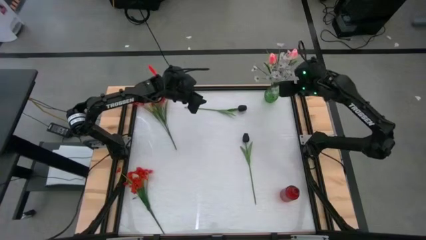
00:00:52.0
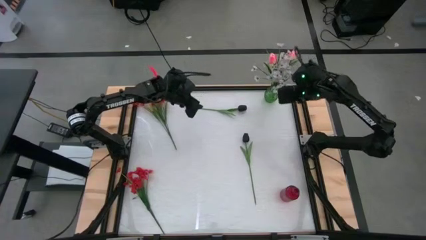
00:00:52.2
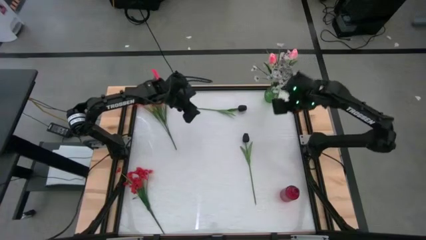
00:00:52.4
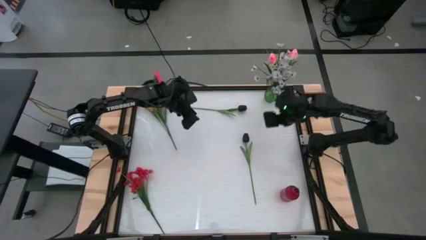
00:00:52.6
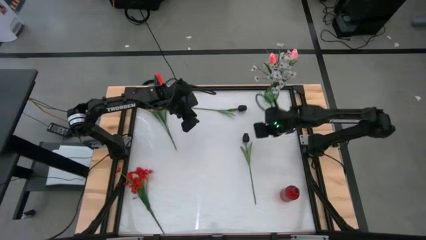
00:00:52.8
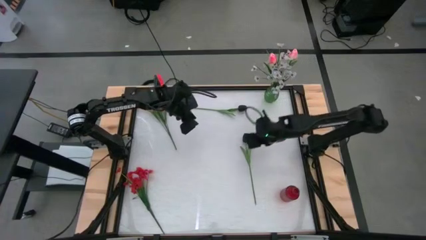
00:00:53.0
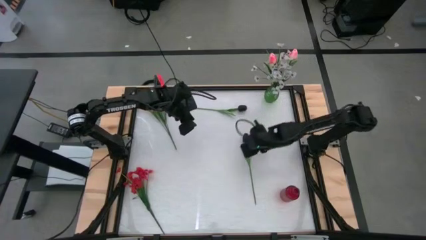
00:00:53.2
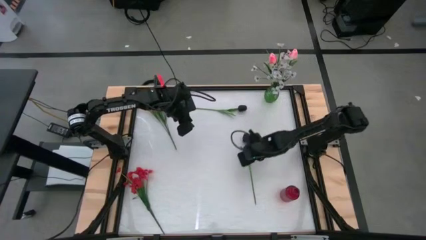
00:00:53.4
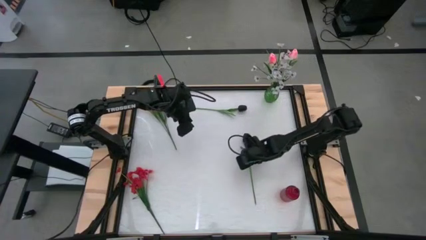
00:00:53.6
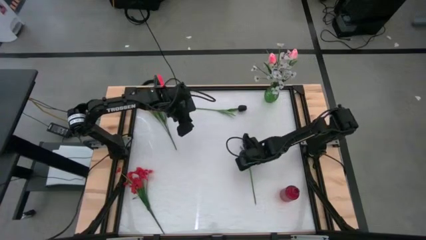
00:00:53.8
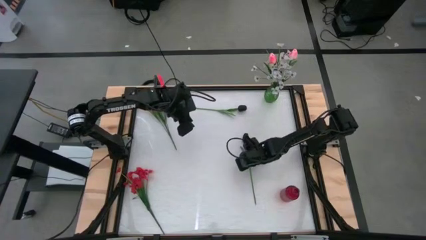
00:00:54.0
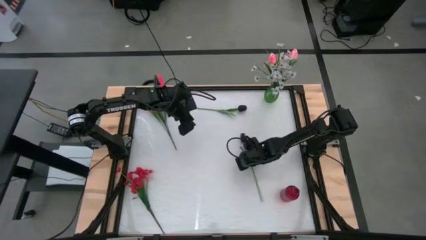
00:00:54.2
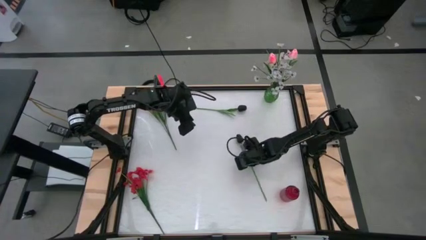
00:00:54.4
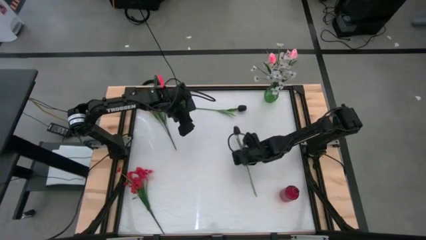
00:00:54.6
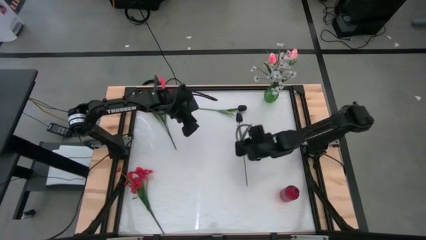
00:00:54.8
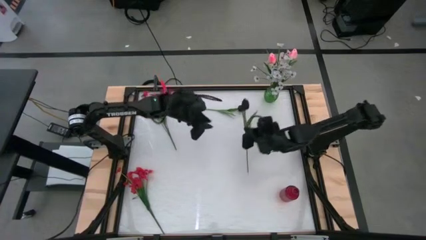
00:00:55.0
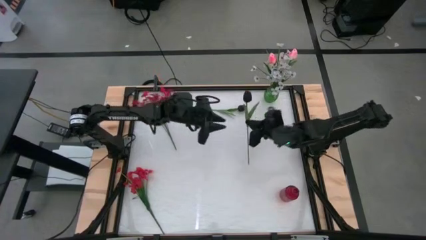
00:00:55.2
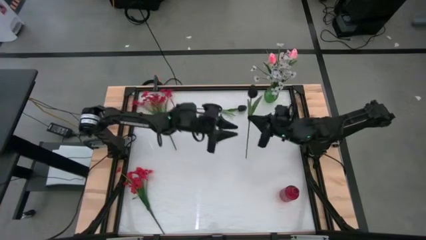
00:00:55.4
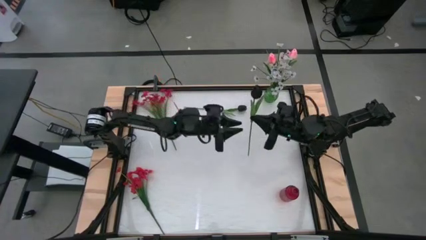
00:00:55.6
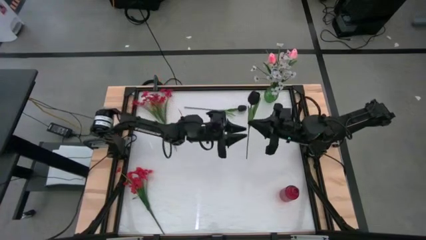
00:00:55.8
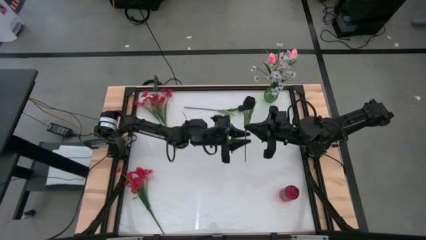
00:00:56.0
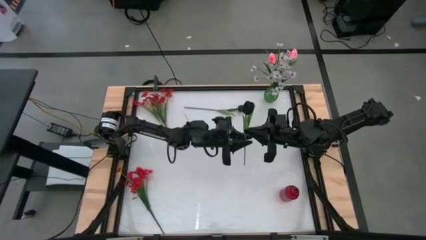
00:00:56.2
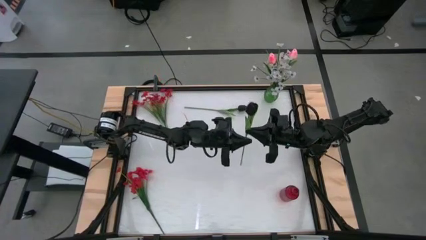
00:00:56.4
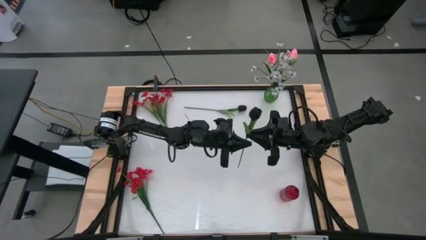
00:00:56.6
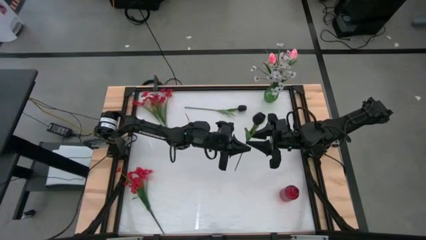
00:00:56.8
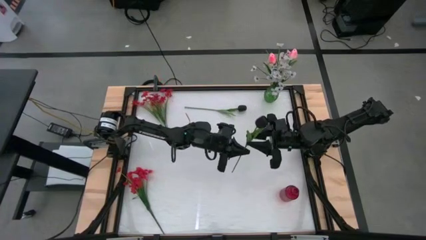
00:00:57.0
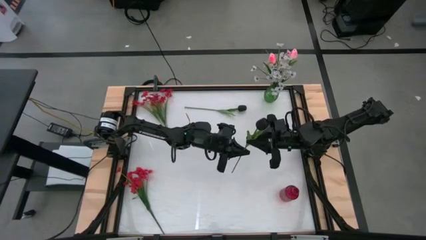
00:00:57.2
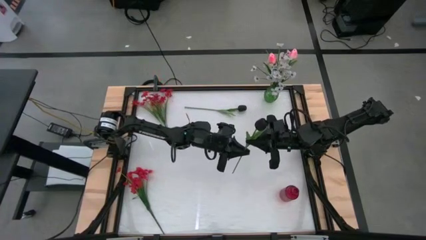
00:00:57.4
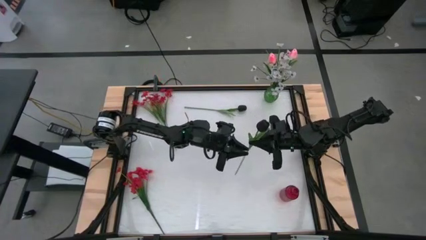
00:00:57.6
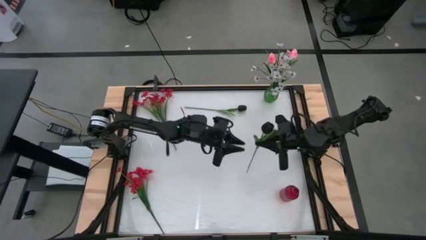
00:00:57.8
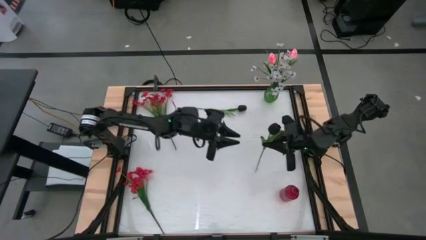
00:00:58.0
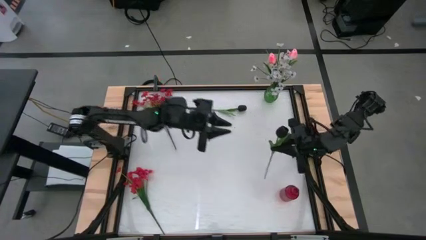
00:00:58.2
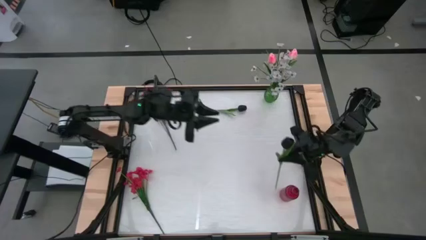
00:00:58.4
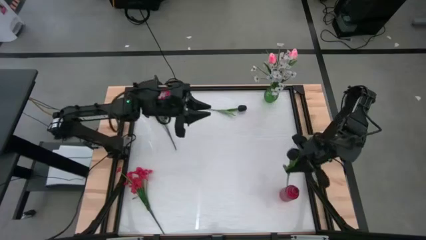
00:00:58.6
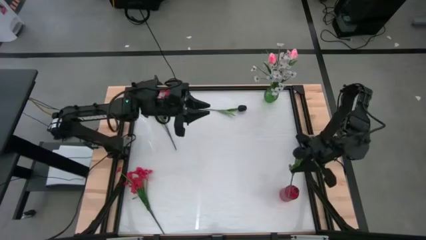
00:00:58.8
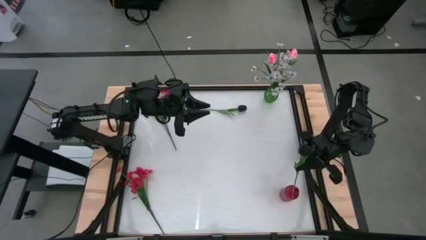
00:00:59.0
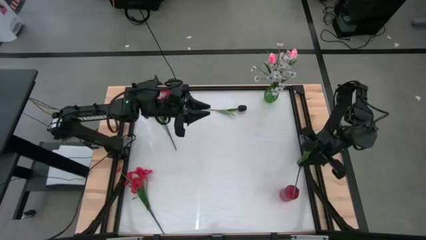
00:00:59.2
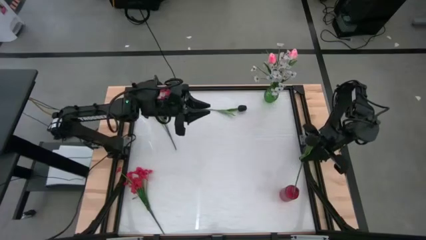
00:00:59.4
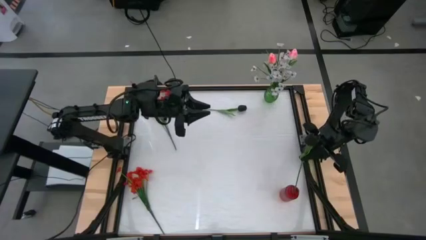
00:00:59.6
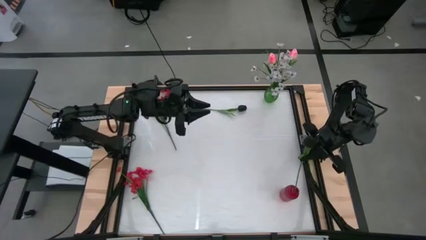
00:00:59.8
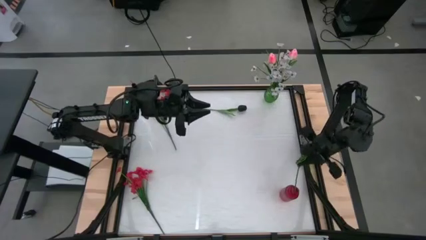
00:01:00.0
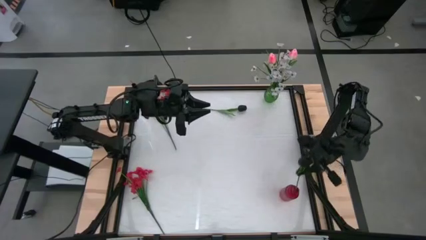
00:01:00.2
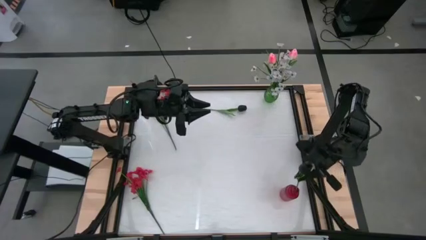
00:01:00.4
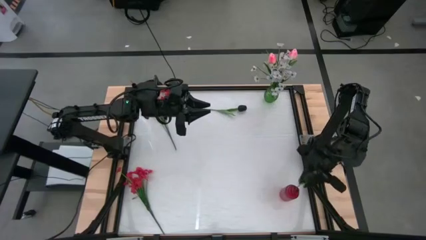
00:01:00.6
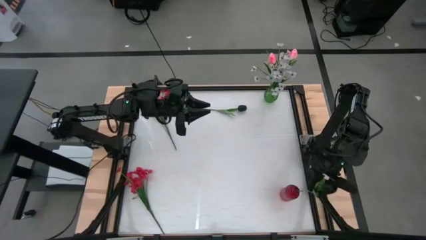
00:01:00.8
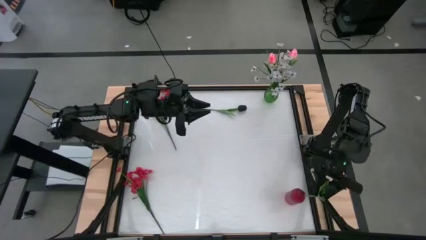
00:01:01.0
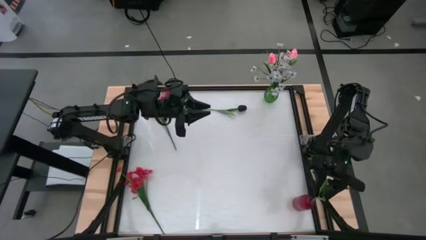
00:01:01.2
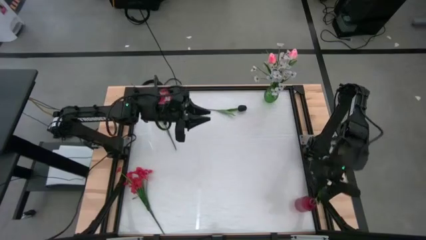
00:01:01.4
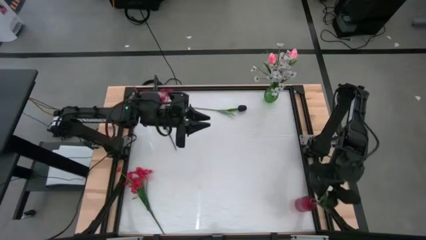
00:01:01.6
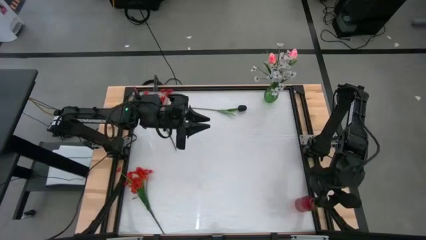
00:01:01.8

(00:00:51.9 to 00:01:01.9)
Task: Sort flowers into vase by color
Put the bottom black flower into the red vase

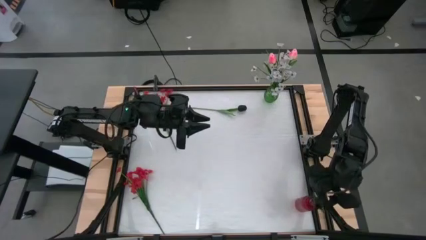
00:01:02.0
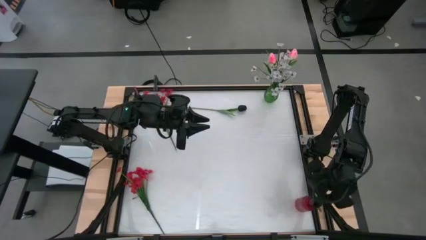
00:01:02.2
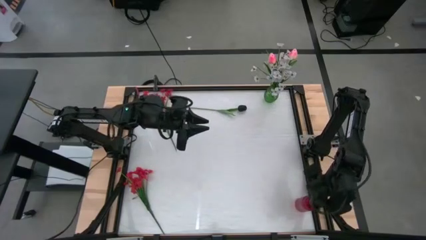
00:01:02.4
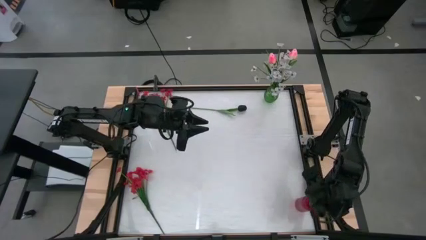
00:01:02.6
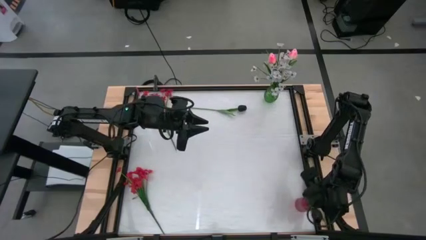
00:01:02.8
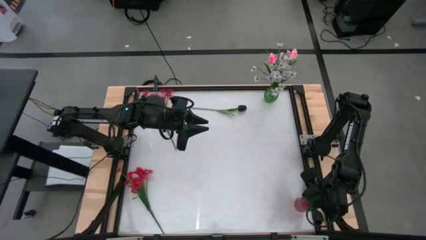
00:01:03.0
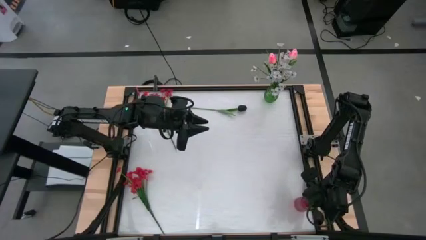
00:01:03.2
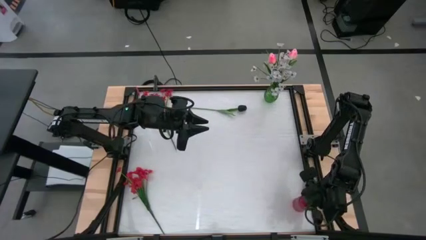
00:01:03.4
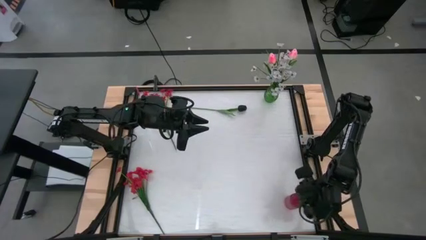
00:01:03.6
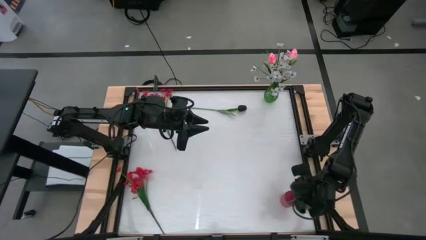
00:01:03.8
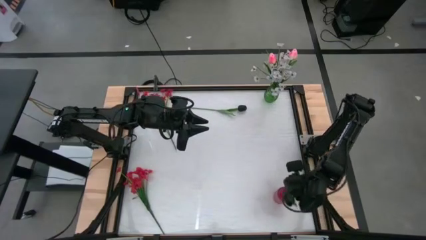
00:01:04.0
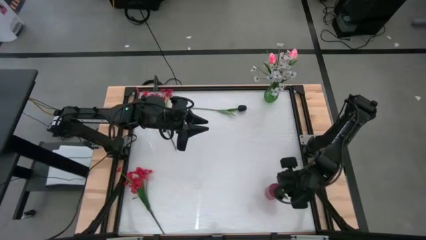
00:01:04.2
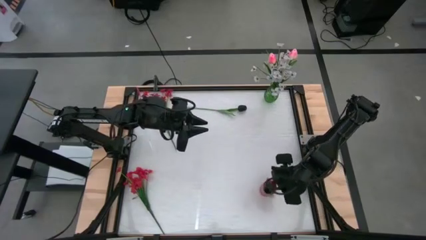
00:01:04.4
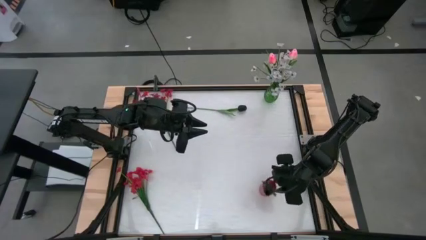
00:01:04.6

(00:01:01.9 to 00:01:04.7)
Adjust the red flower vase
